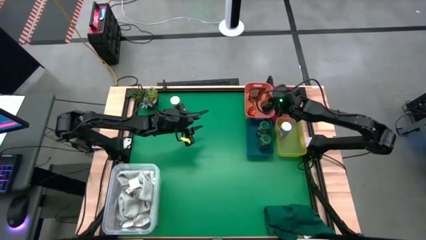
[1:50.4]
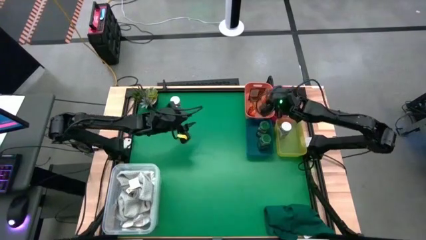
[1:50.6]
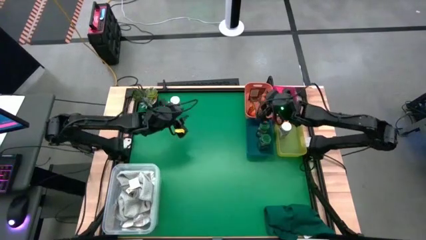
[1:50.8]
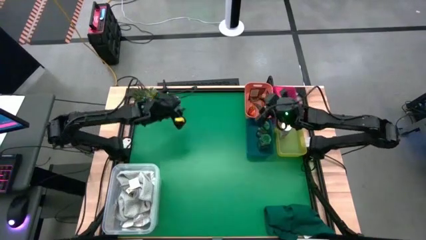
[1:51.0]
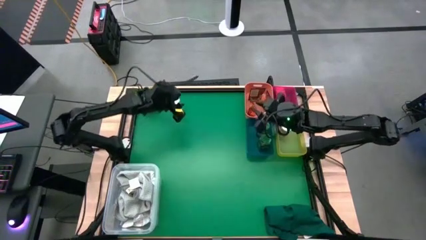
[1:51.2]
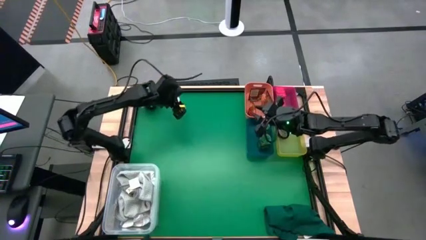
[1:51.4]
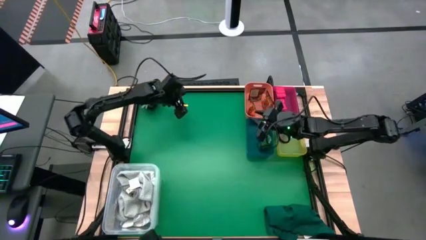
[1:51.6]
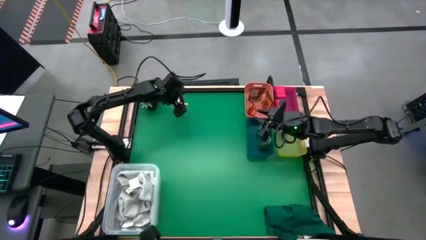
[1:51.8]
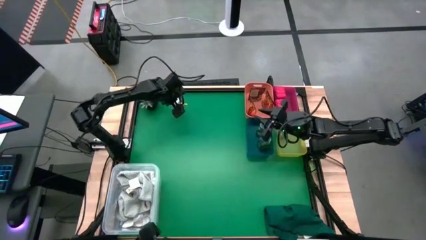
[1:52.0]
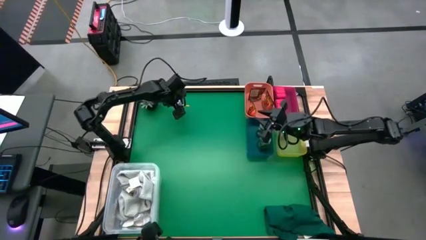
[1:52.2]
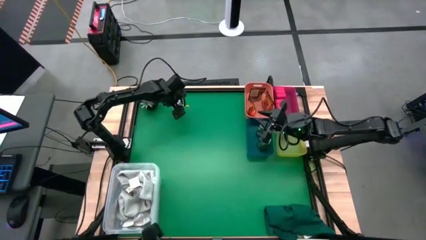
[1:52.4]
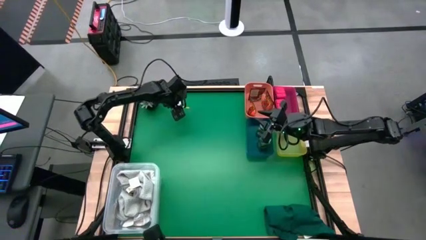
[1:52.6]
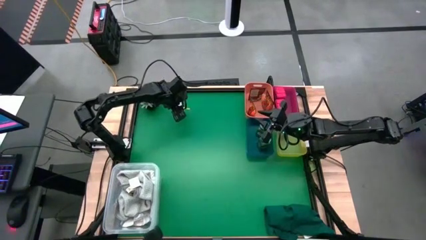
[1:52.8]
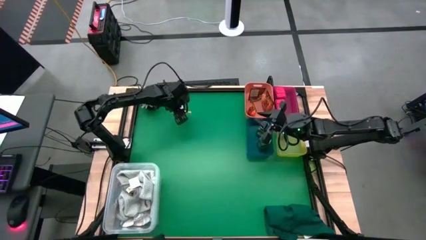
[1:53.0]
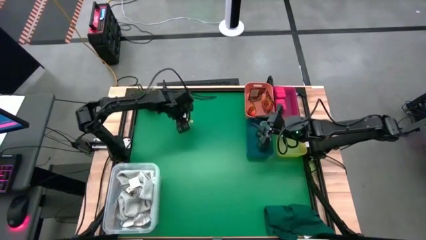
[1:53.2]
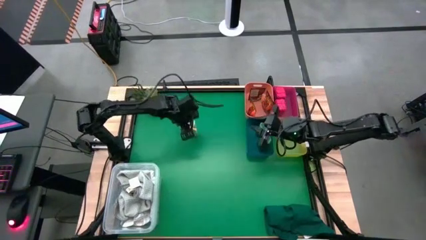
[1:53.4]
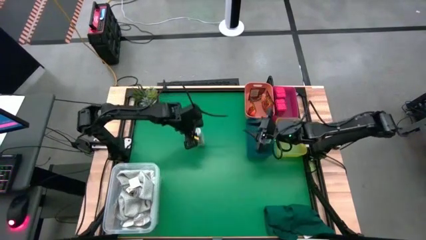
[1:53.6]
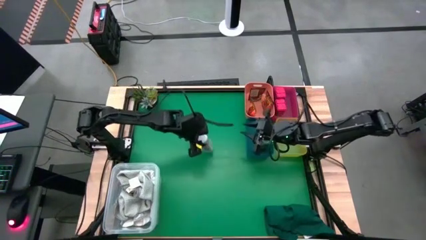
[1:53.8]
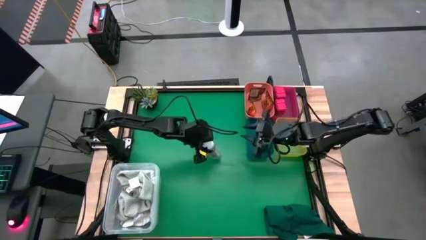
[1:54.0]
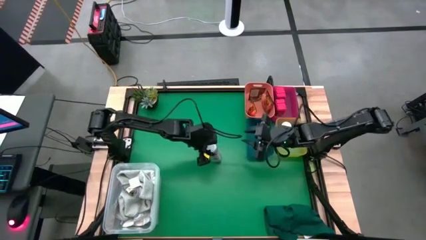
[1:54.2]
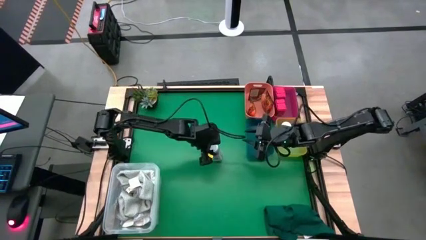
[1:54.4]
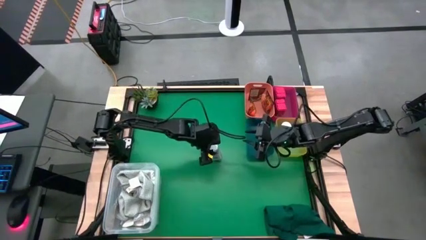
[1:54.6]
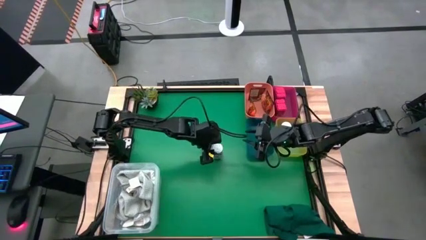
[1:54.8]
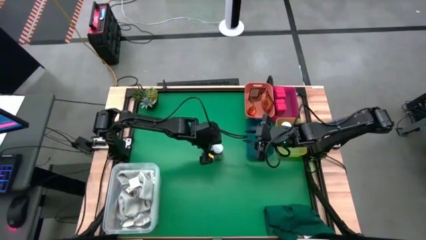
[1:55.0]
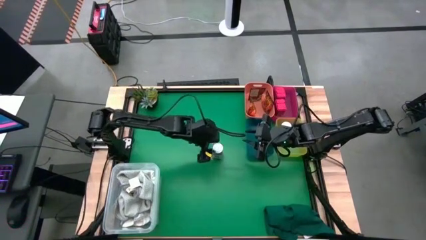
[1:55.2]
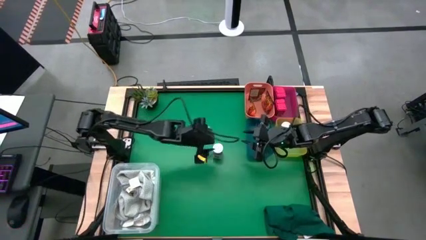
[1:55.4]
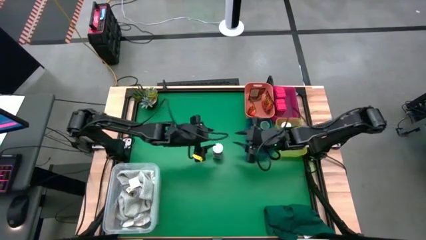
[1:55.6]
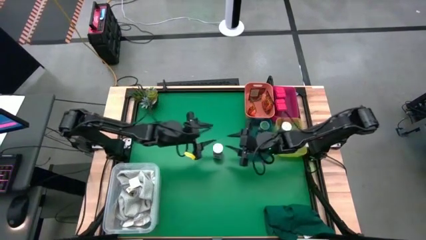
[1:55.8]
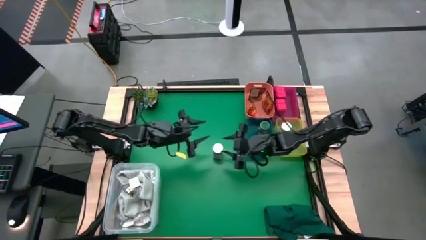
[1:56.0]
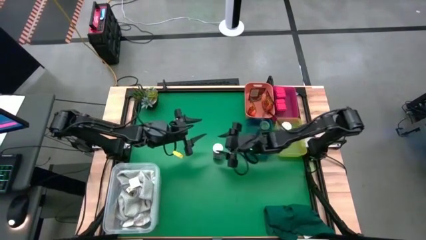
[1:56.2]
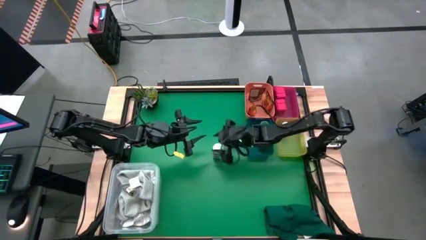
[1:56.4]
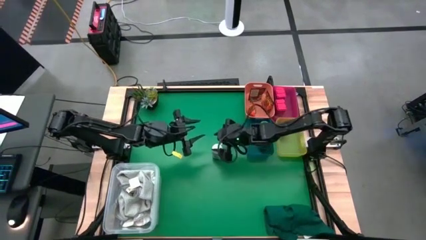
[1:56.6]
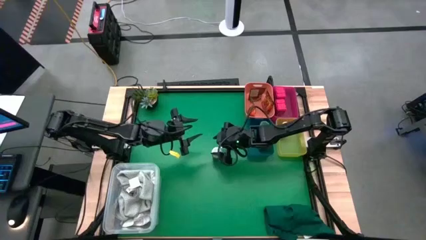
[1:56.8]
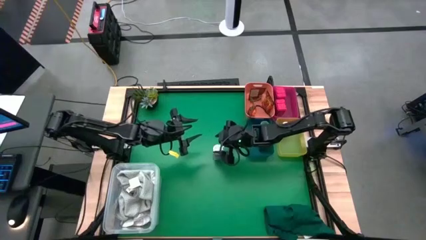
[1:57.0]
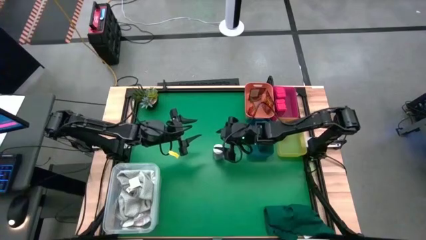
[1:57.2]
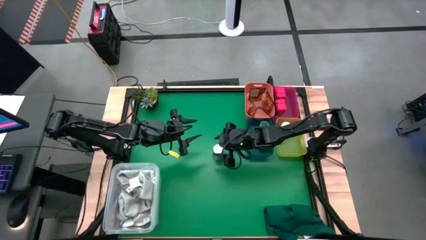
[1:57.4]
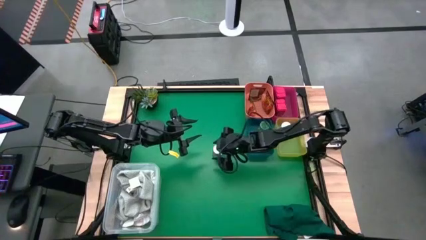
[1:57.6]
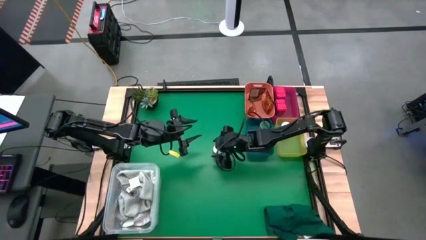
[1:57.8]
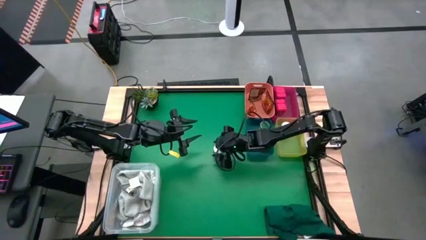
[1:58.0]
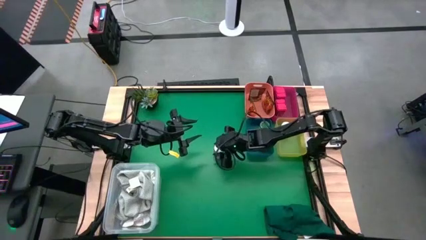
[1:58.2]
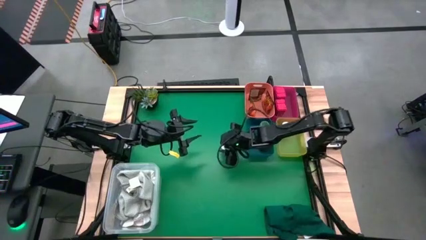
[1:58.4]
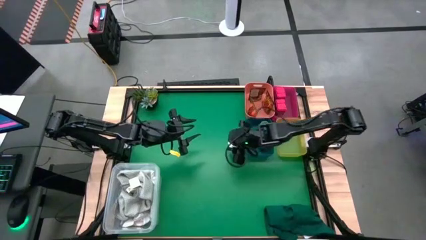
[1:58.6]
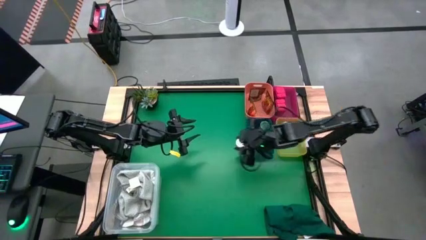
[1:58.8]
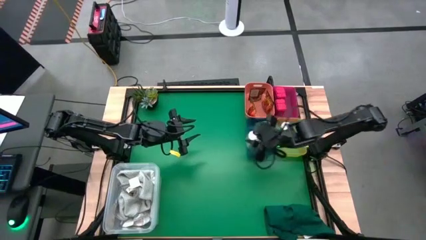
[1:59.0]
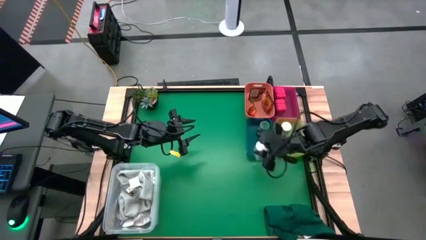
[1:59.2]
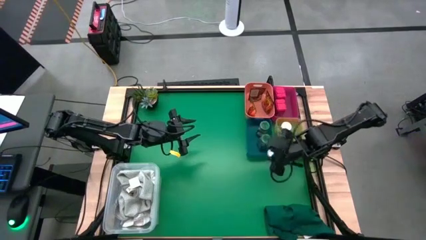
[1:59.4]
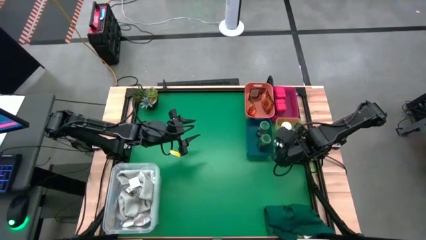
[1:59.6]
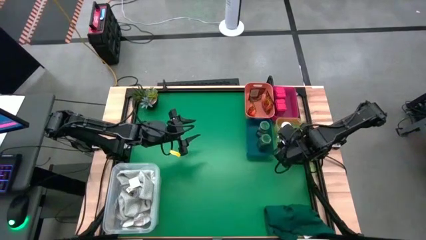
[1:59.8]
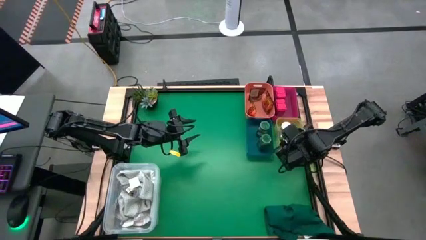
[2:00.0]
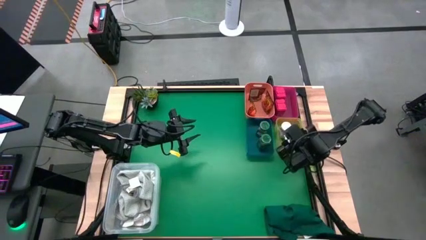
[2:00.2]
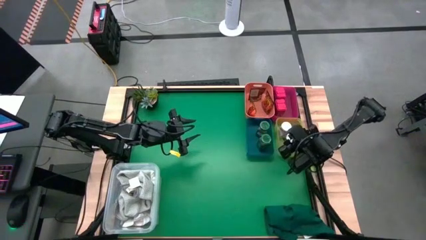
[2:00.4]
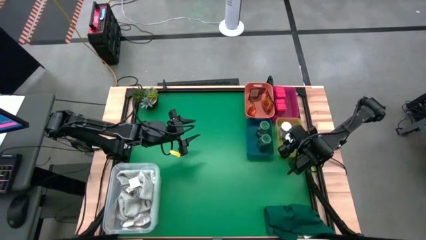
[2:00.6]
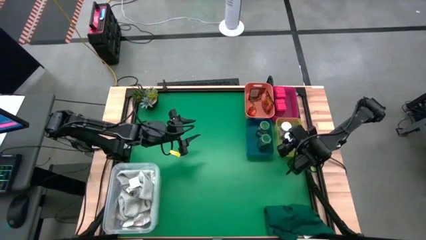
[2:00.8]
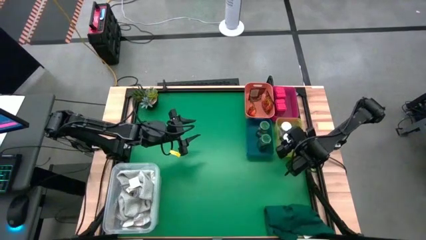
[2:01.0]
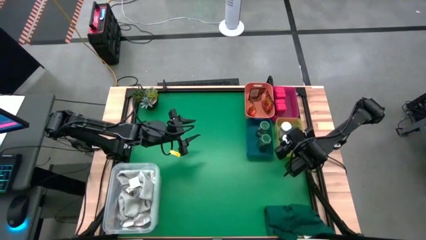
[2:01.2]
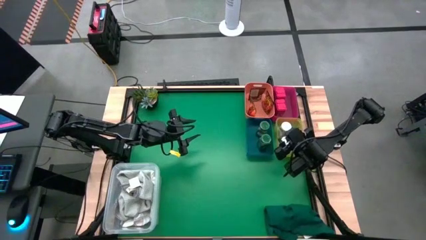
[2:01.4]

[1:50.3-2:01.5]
Task: Sort spices by type
Put the white seasoning bottle into the yellow bin

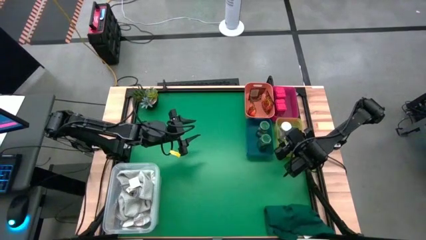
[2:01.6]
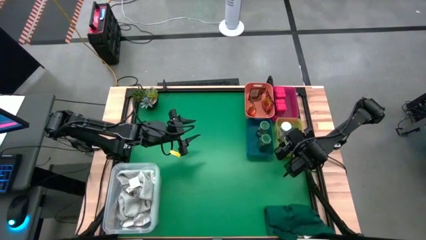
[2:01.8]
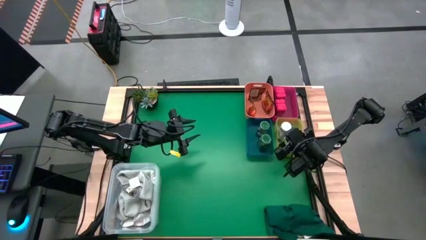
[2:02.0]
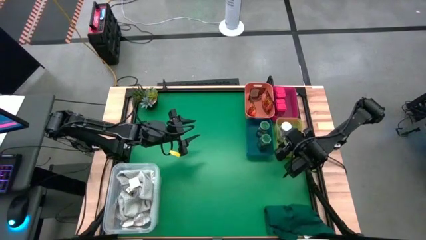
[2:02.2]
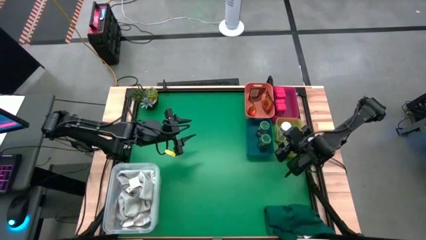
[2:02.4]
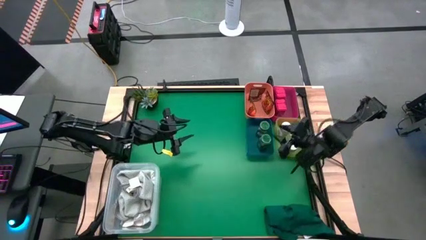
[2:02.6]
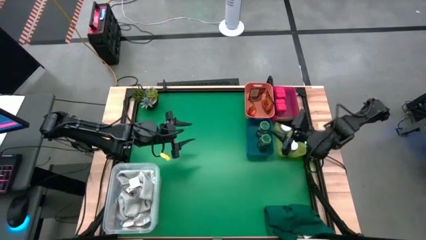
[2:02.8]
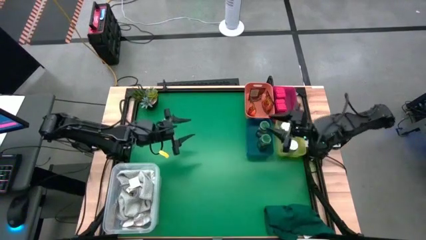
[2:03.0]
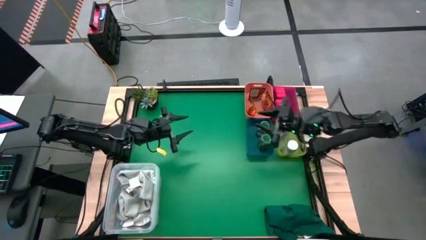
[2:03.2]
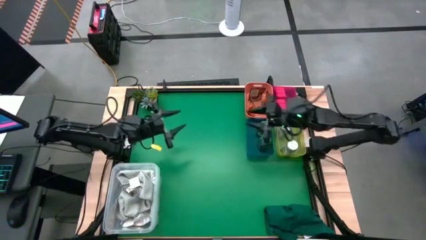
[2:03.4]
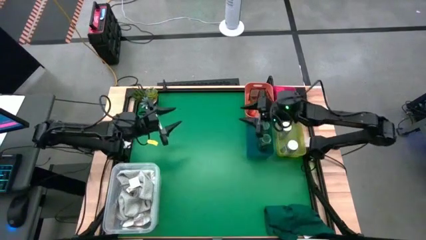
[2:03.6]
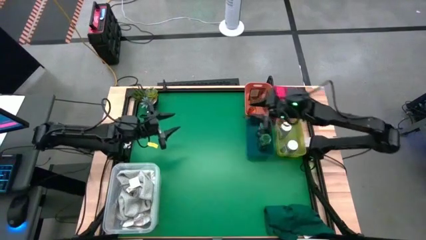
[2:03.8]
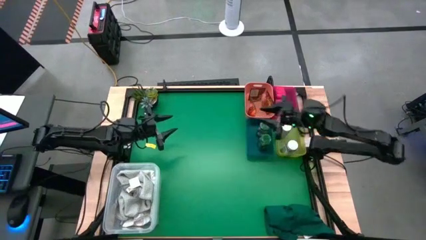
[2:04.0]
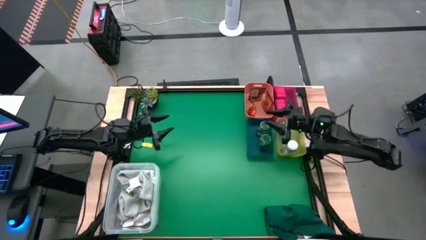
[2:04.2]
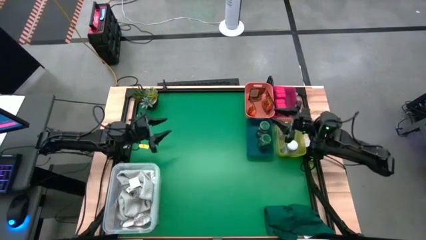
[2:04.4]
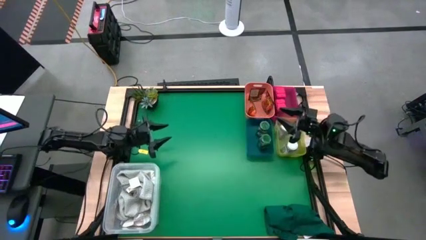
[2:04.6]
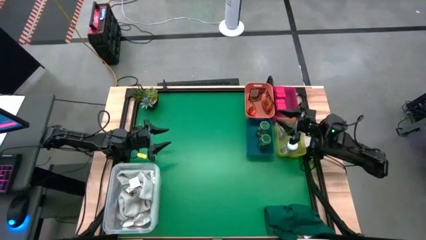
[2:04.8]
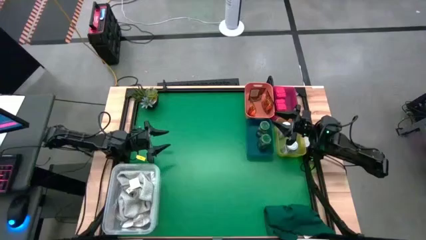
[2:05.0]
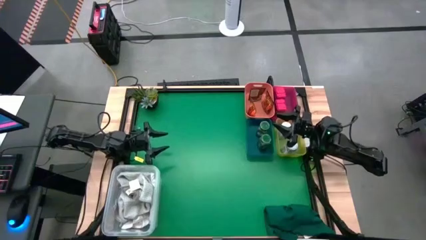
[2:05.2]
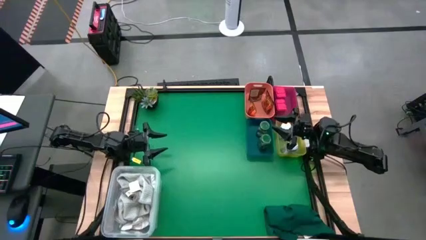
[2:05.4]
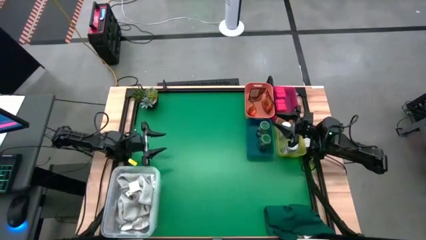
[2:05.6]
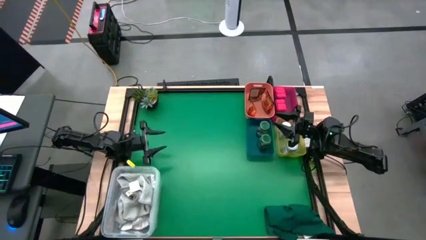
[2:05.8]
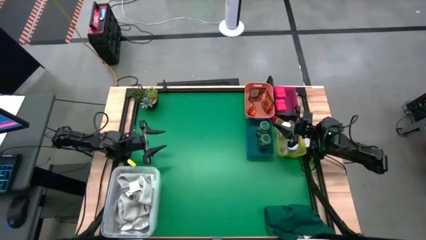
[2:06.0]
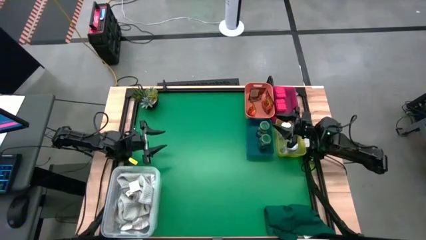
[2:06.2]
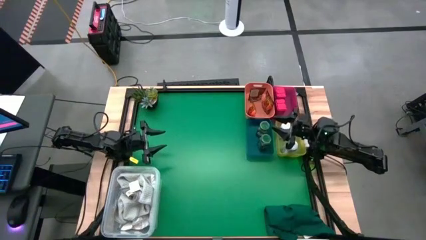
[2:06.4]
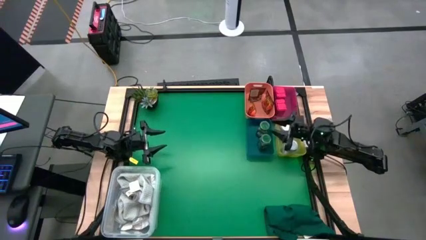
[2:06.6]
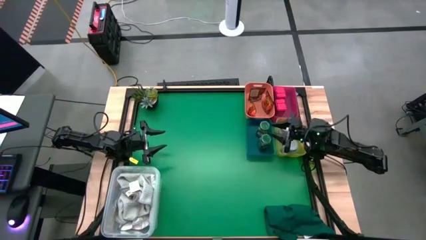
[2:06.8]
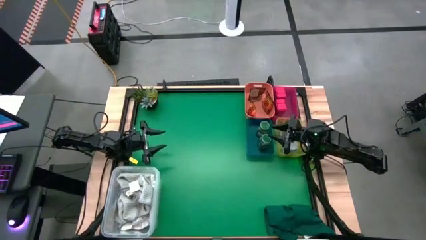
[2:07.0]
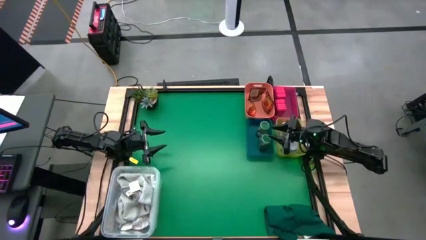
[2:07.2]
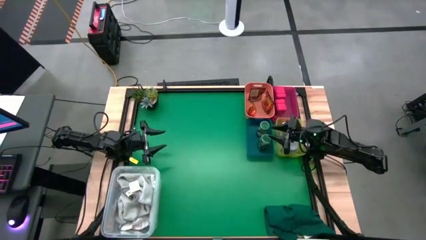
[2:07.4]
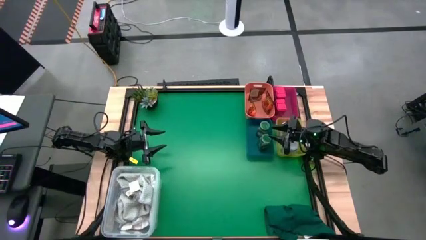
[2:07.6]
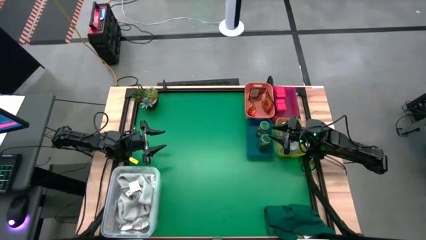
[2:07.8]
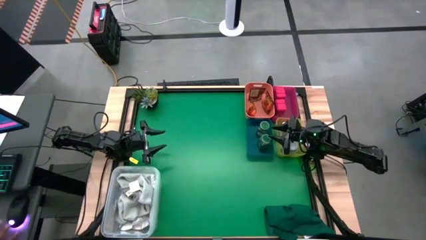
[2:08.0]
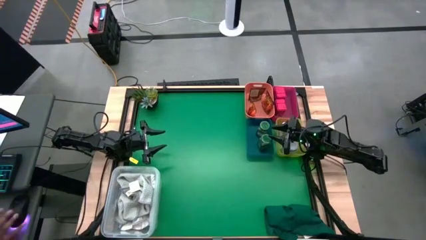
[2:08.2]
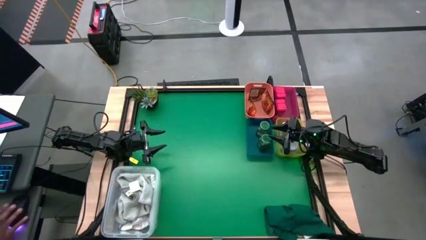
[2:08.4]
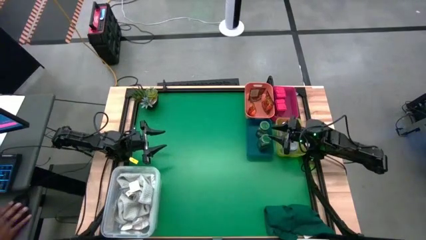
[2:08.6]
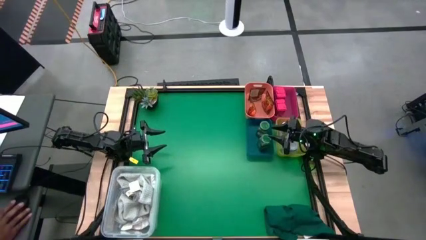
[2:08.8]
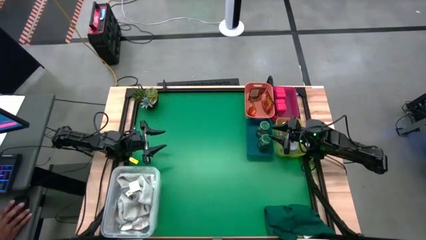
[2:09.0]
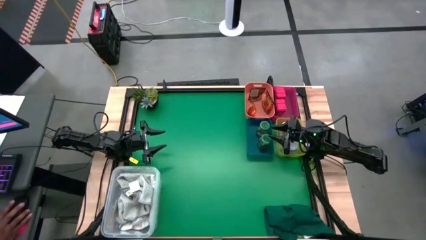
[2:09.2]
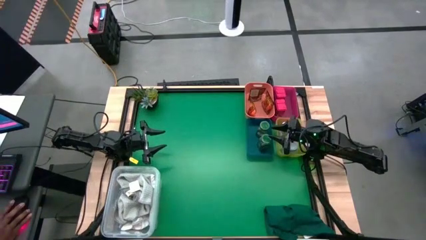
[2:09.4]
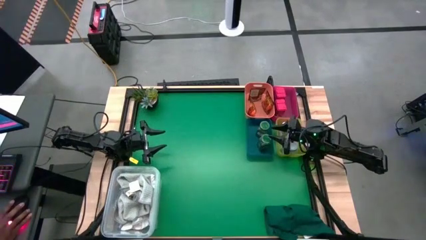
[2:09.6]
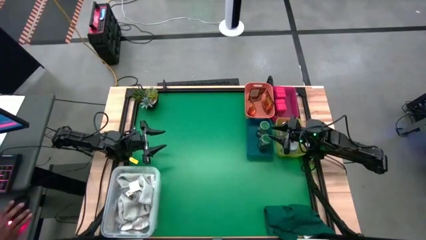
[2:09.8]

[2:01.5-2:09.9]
Return to Home Position
